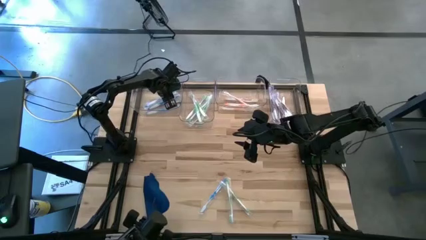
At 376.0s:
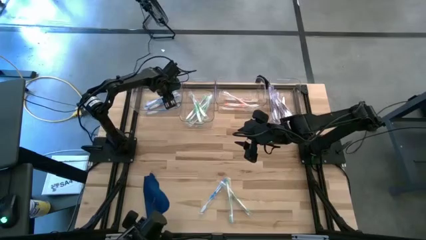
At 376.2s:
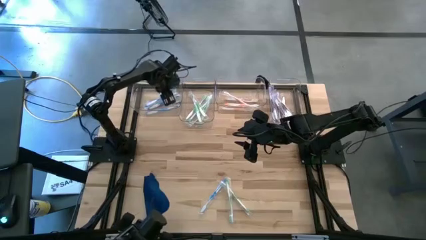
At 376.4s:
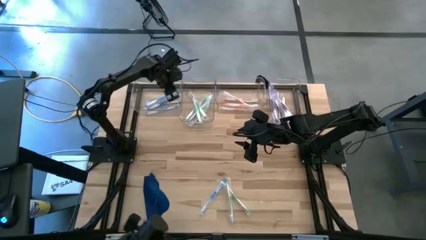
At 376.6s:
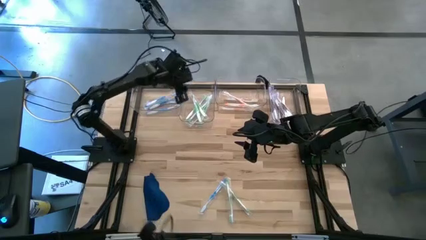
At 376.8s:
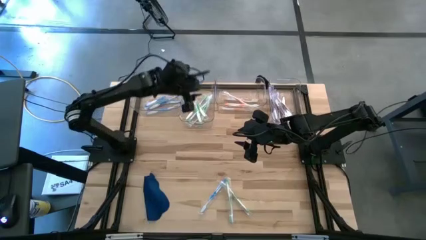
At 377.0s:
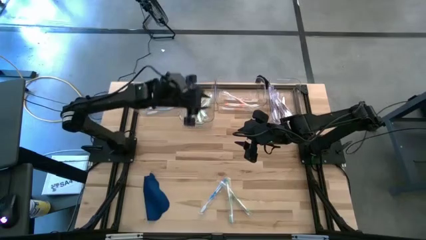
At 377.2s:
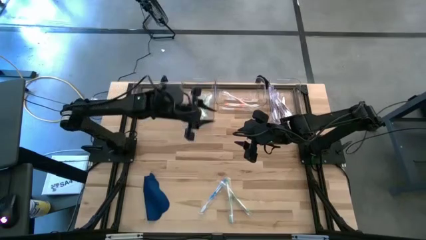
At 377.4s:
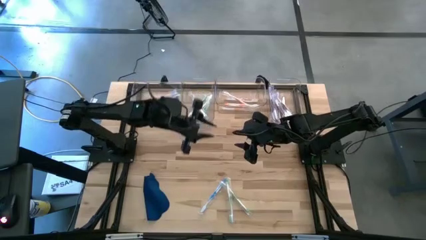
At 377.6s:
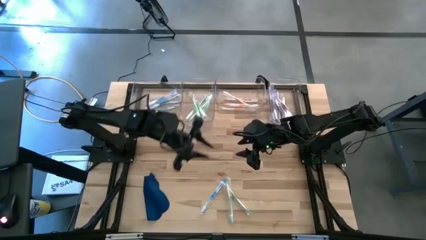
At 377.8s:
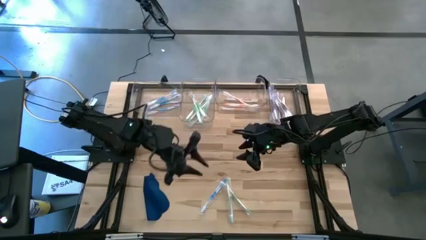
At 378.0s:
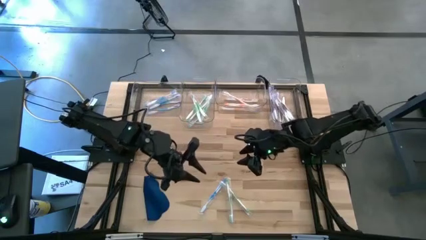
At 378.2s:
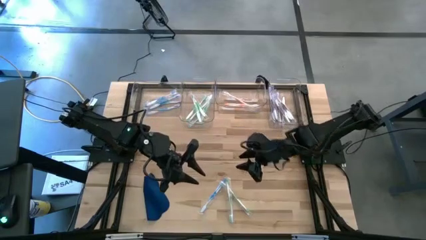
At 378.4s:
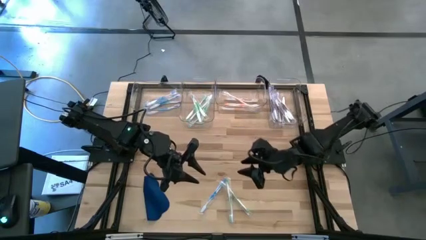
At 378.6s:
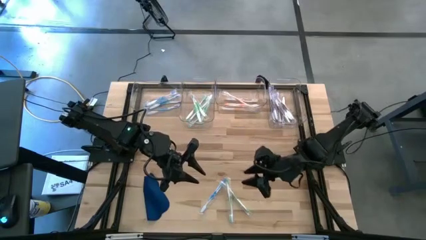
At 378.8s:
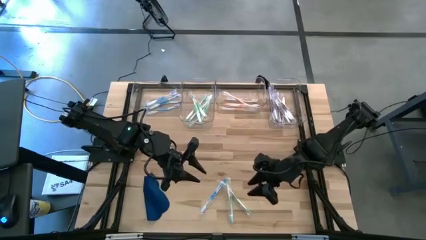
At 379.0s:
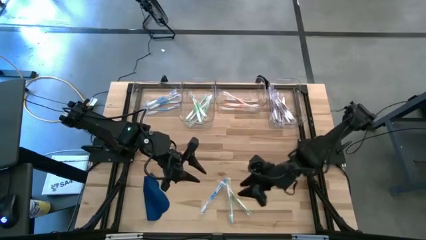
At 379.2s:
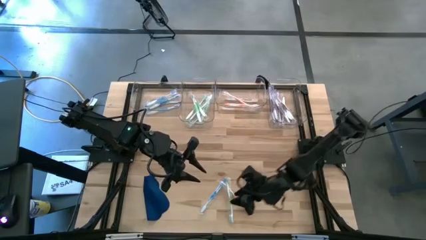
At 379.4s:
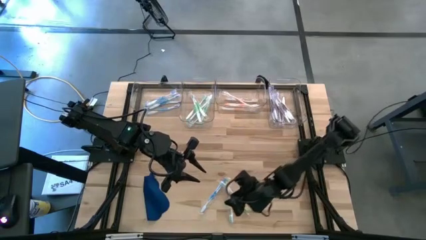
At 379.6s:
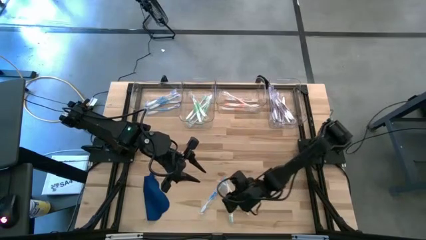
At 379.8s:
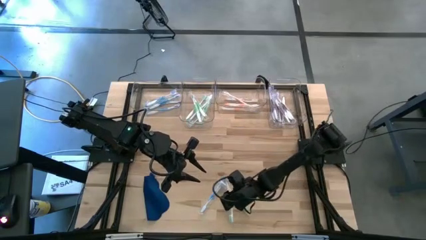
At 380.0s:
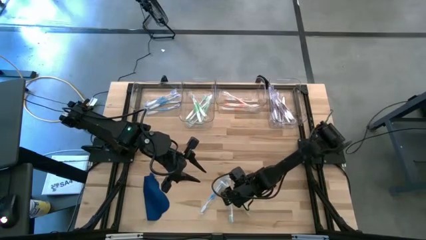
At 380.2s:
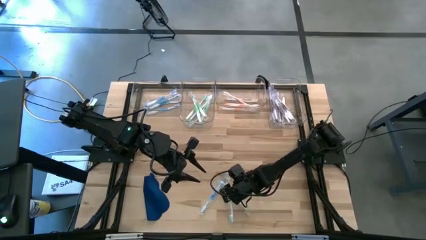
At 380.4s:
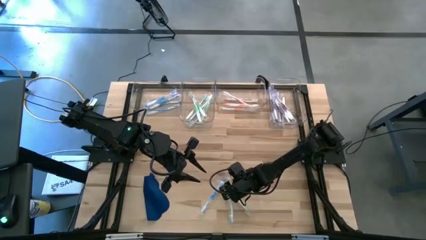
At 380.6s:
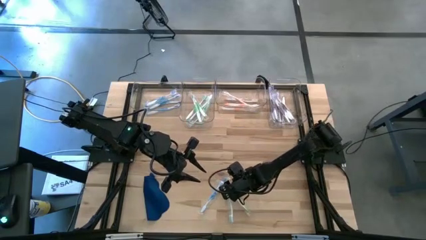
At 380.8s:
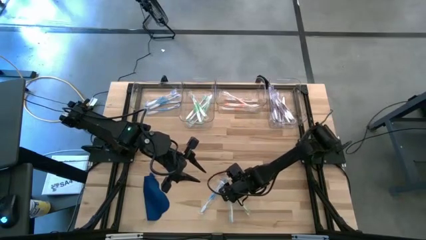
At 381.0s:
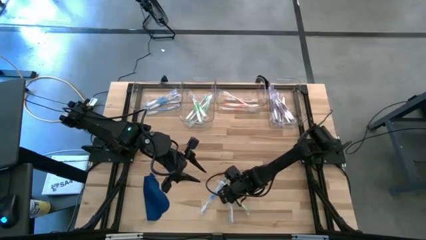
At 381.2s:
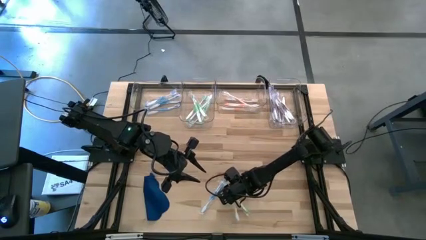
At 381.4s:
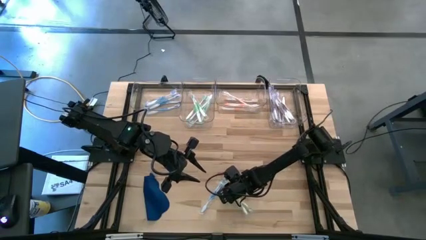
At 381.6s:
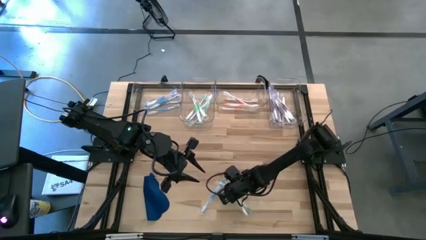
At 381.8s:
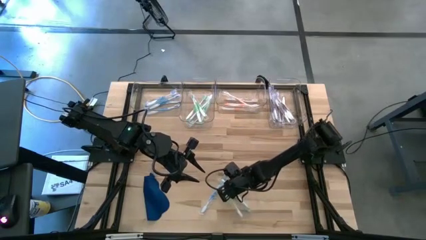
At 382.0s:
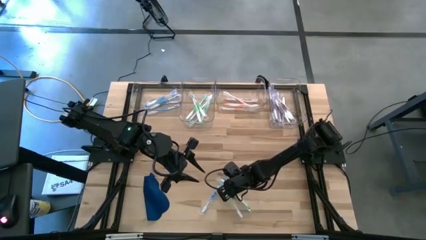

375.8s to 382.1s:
Task: Pick & Place Toothbrushes
Put the green toothbrush into the middle left transparent bin

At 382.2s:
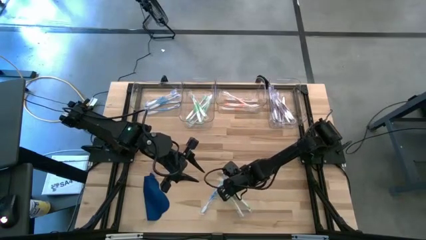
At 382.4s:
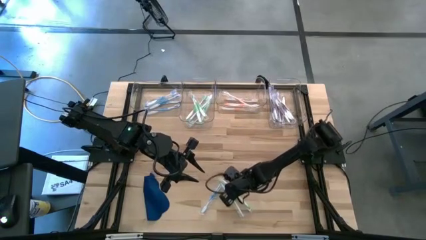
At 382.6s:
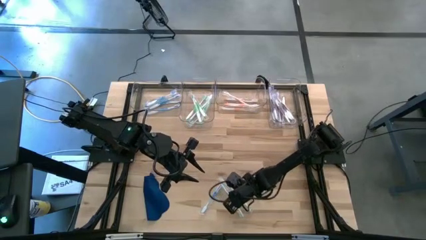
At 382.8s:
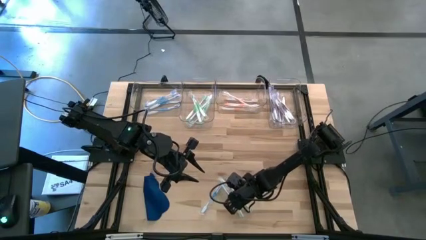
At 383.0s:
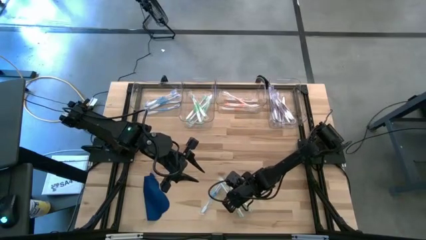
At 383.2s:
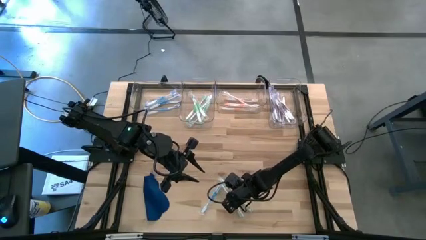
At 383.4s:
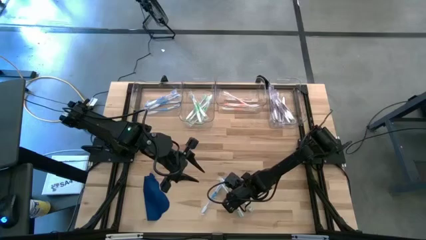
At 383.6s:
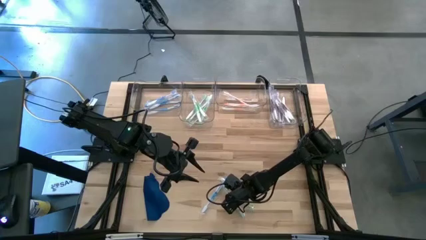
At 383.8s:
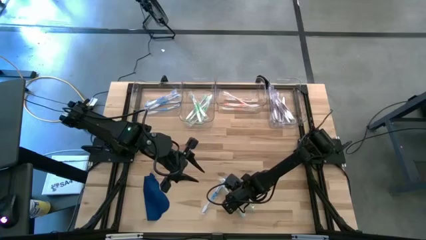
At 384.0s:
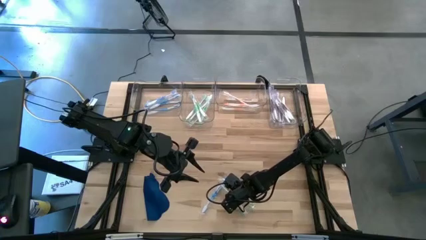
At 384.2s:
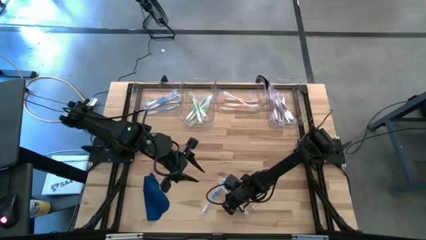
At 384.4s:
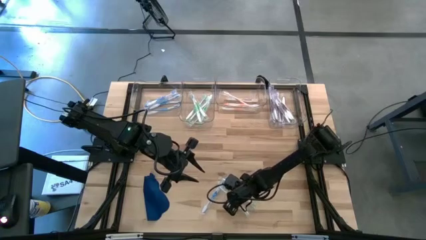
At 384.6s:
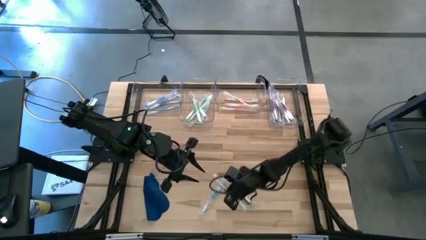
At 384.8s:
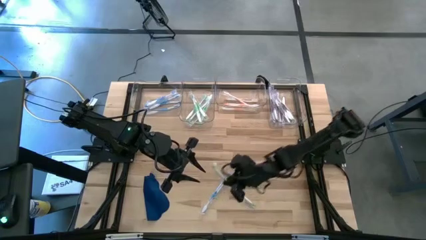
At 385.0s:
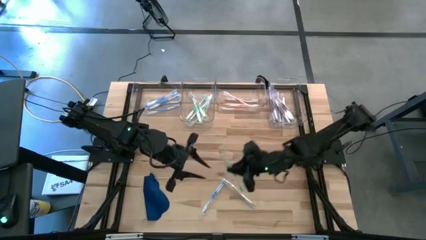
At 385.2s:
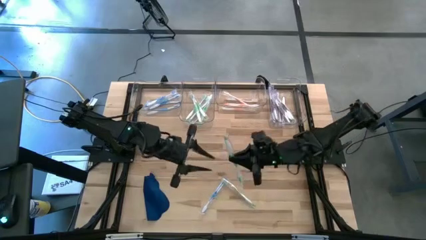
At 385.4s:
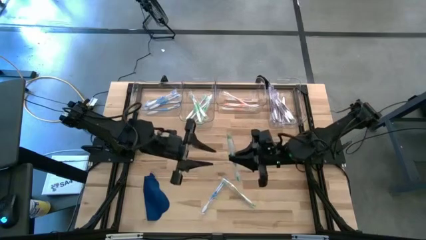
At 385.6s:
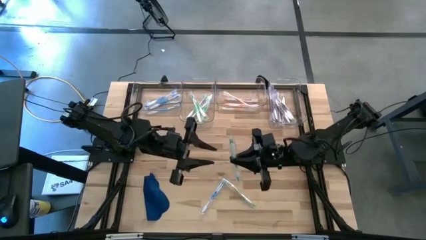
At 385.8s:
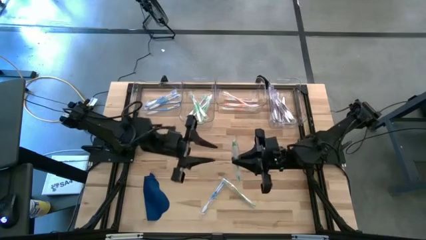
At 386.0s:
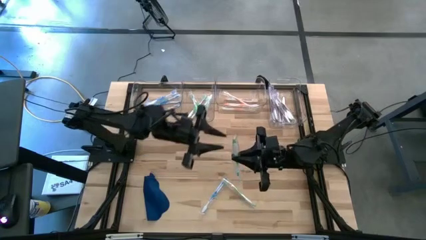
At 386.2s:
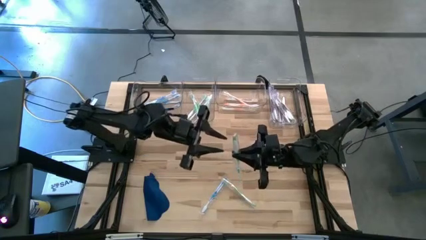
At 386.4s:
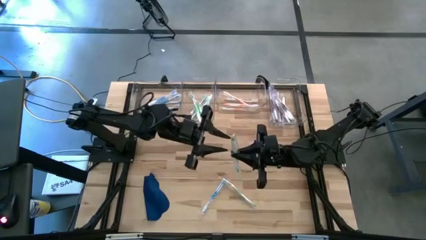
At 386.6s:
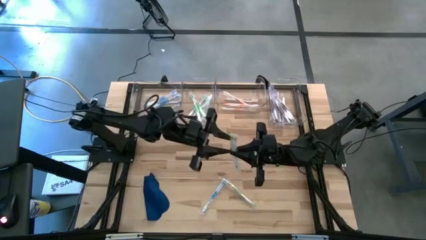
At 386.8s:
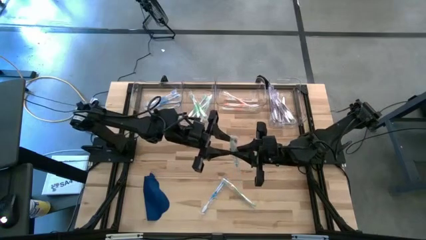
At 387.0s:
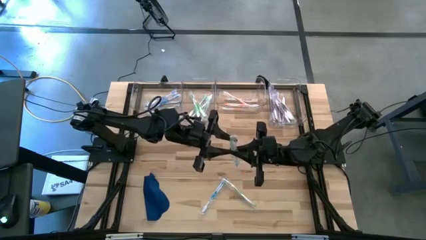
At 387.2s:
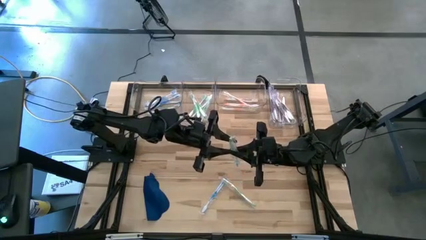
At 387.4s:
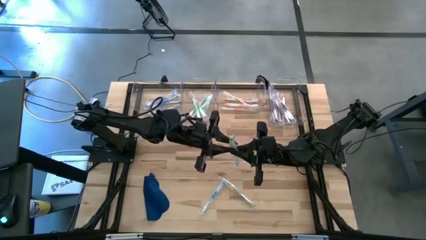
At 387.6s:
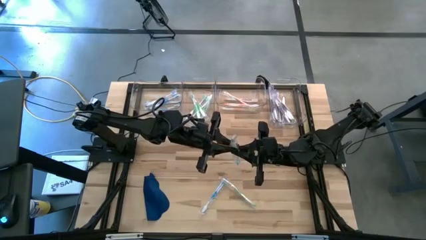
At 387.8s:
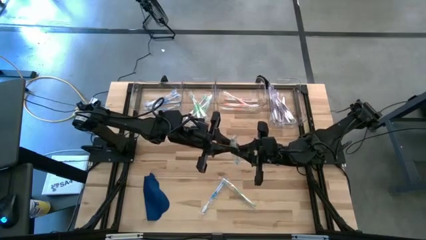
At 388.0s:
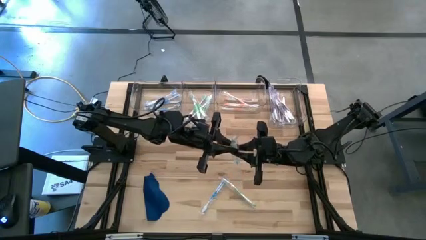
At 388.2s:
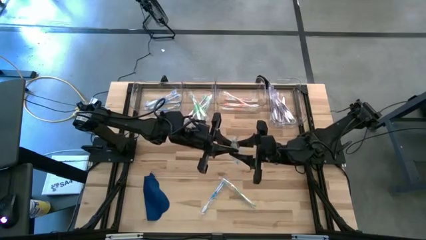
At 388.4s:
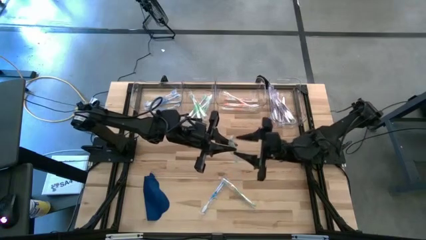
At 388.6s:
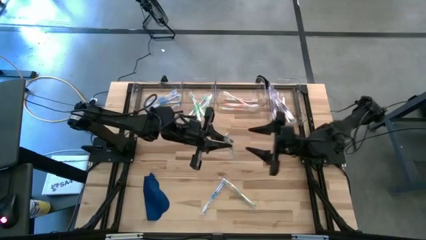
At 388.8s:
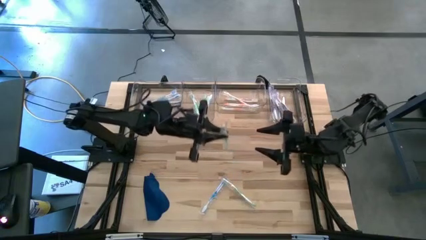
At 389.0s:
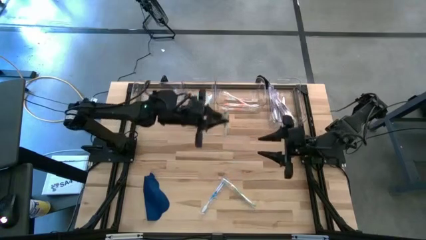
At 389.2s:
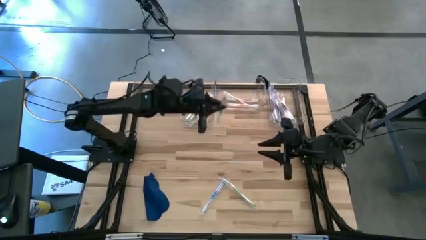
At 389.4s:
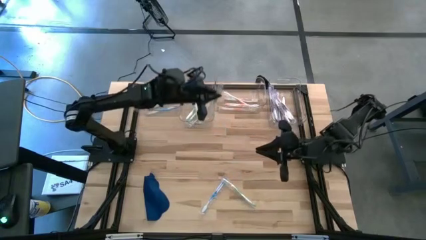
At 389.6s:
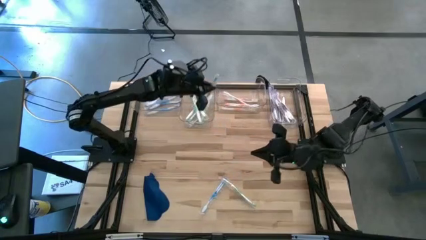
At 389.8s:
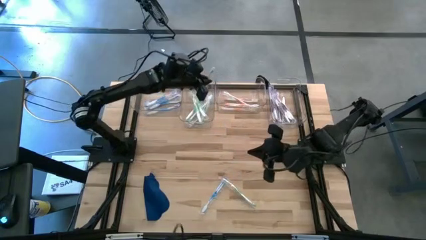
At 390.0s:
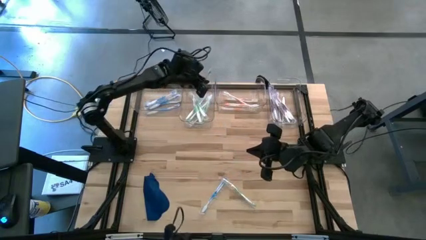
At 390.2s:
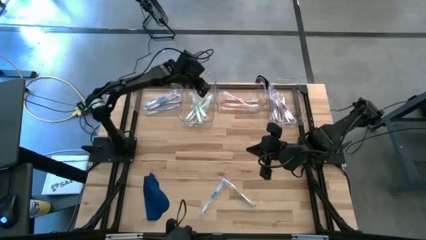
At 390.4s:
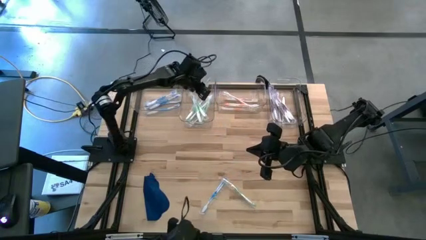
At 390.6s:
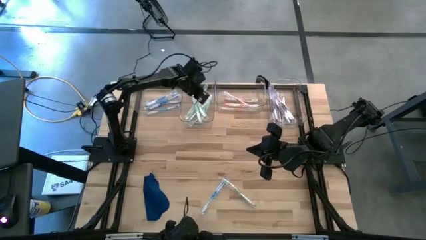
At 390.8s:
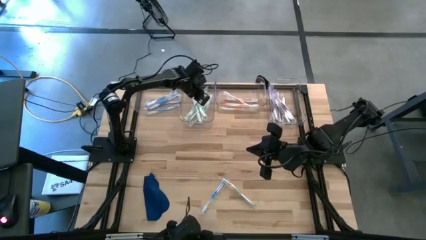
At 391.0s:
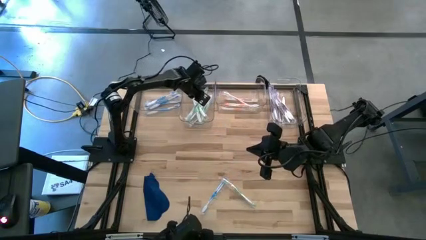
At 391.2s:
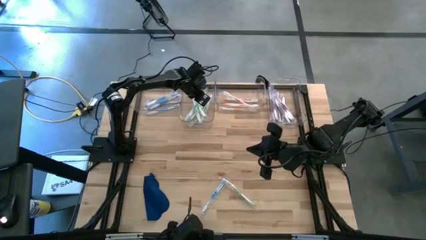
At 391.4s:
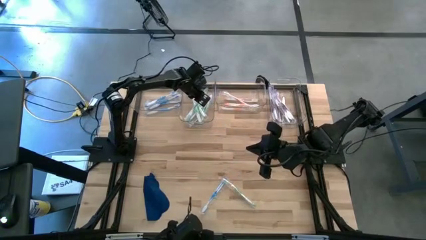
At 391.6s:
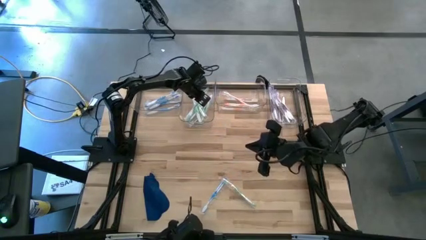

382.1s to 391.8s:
Put the green toothbrush into the middle left transparent bin

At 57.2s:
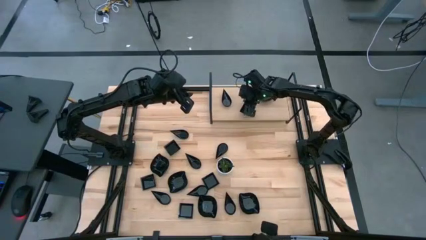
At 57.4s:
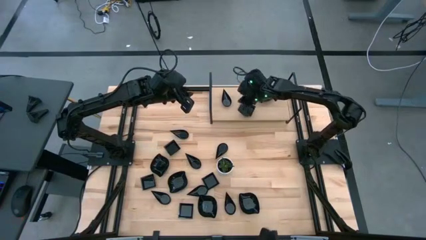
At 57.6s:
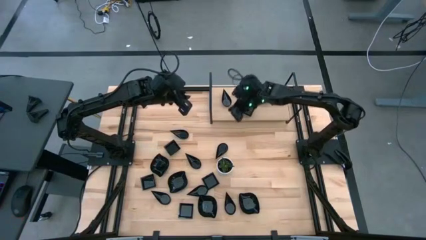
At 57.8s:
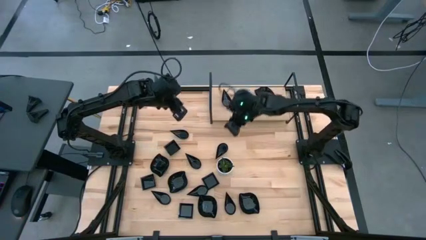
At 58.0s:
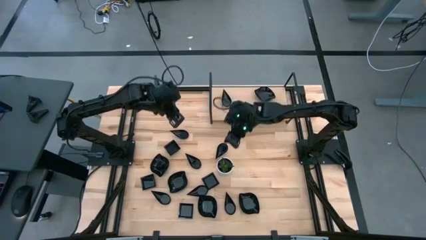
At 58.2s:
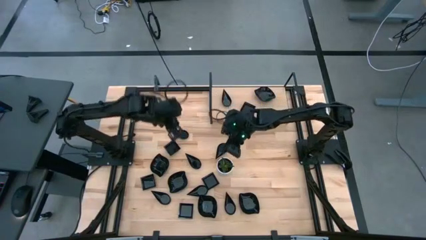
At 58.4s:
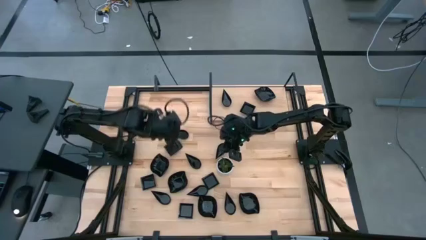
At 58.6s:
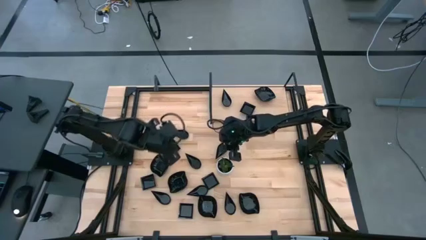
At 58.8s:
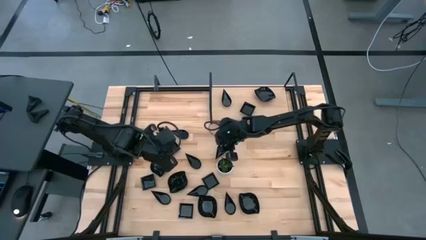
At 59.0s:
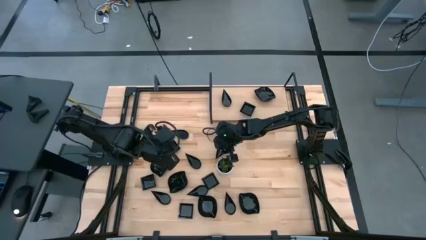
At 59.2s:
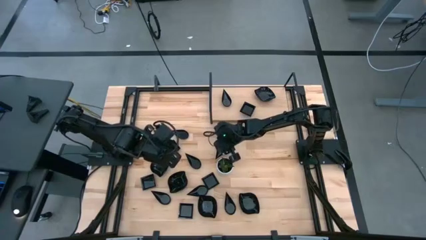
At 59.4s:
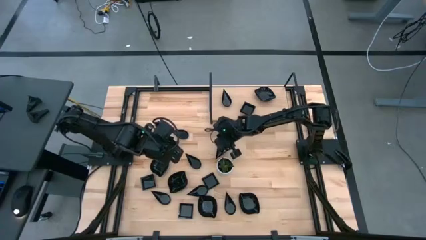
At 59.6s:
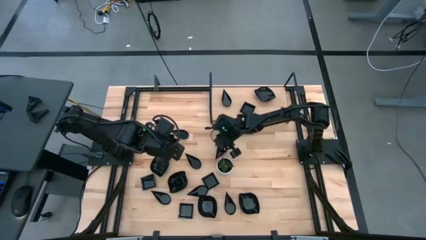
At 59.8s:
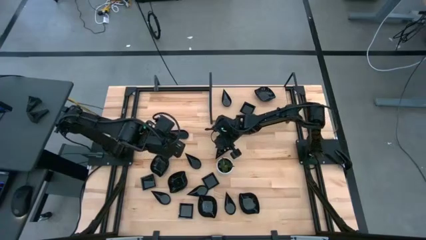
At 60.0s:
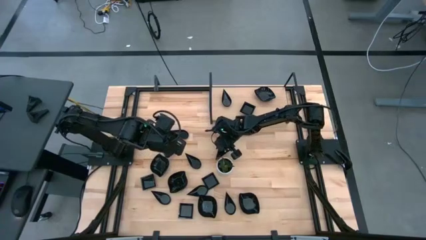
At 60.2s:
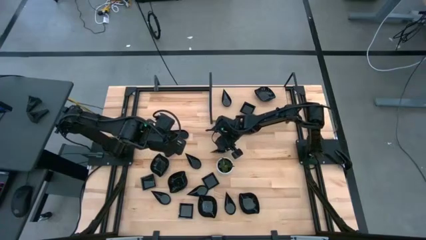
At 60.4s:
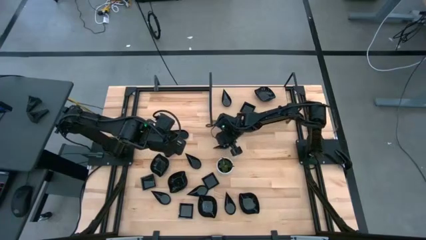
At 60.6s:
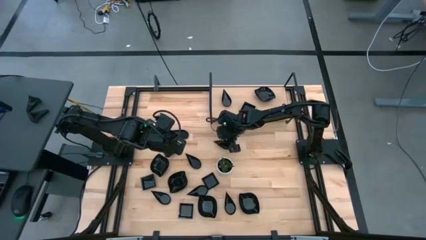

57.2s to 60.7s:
Task: Pick & Place Mini shaped plates
Stack the drop shaped plate on top of the drop shaped plate on the shelf
